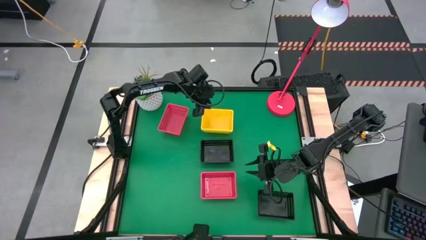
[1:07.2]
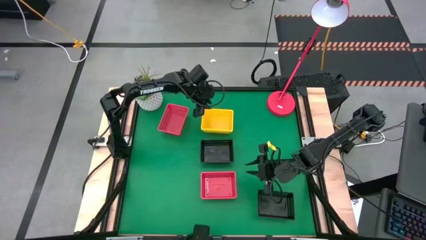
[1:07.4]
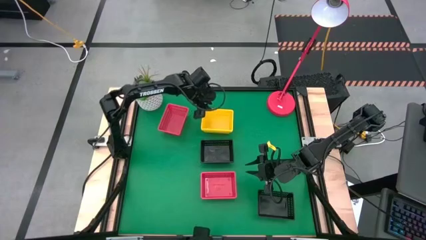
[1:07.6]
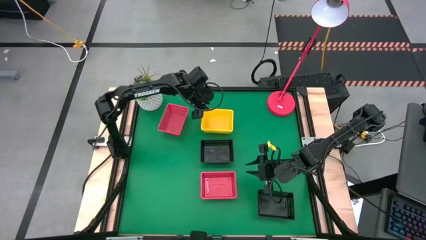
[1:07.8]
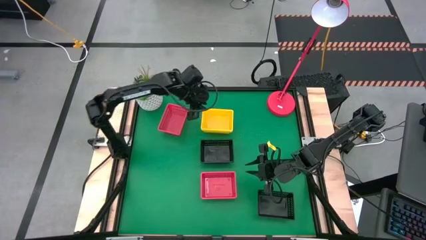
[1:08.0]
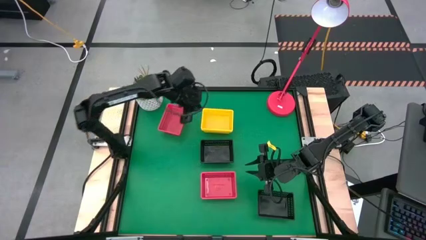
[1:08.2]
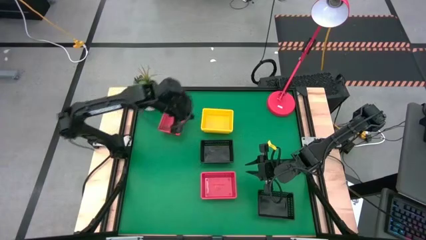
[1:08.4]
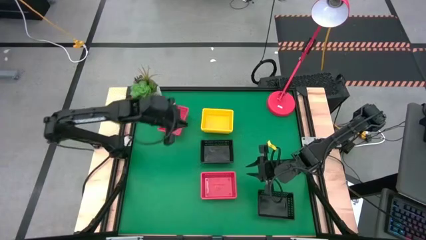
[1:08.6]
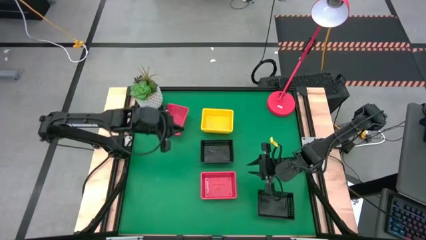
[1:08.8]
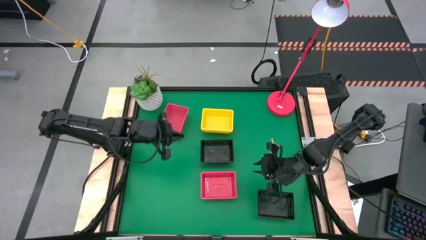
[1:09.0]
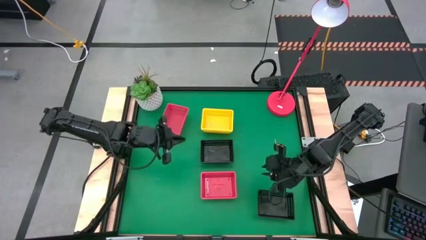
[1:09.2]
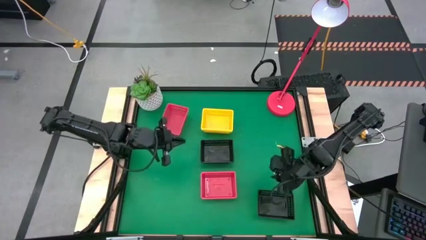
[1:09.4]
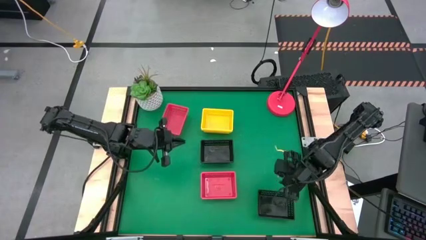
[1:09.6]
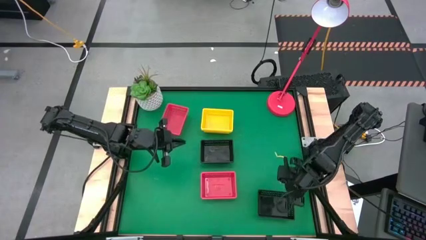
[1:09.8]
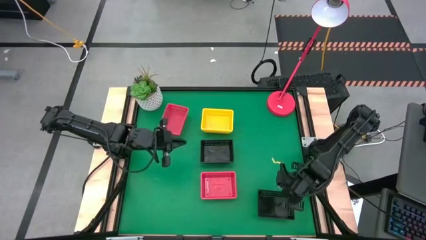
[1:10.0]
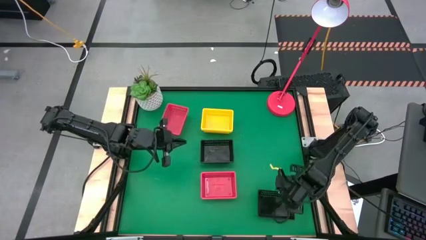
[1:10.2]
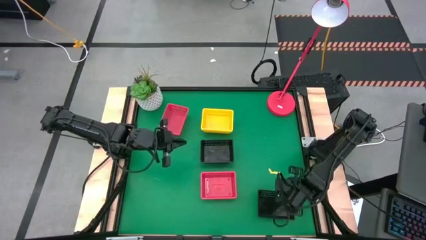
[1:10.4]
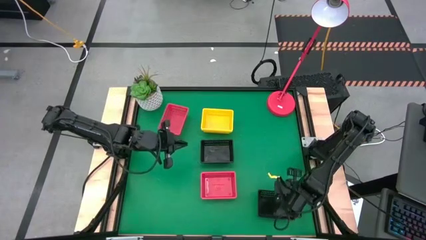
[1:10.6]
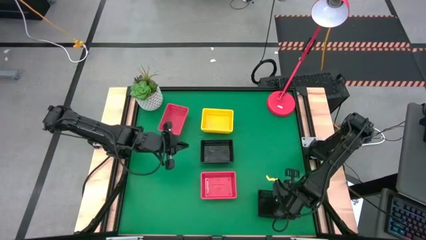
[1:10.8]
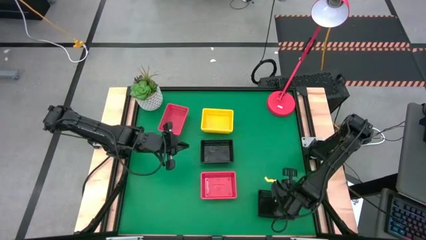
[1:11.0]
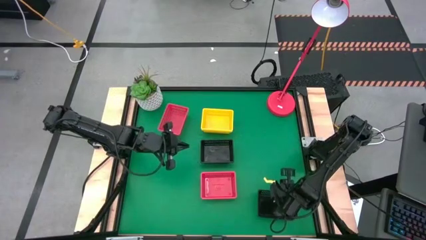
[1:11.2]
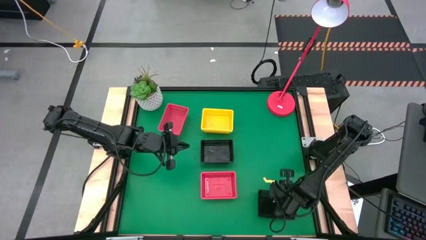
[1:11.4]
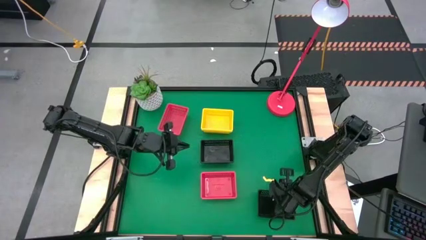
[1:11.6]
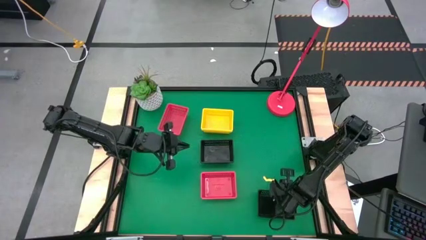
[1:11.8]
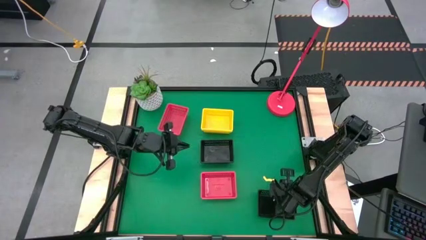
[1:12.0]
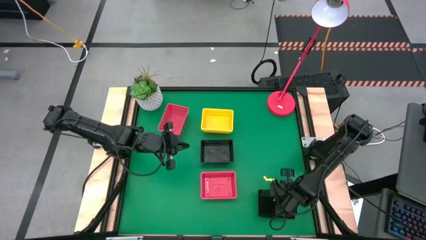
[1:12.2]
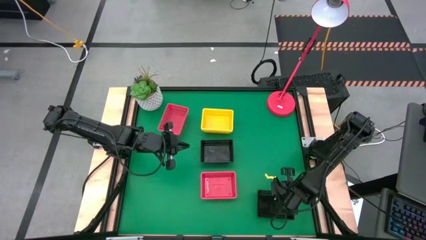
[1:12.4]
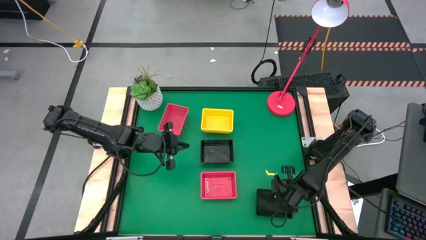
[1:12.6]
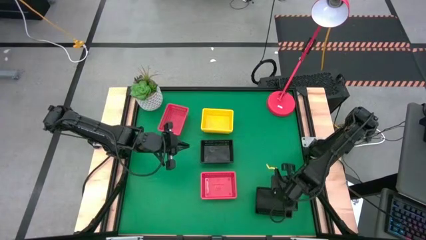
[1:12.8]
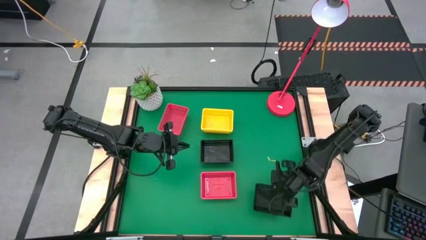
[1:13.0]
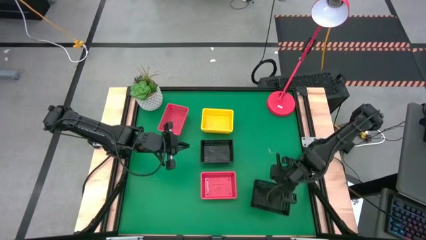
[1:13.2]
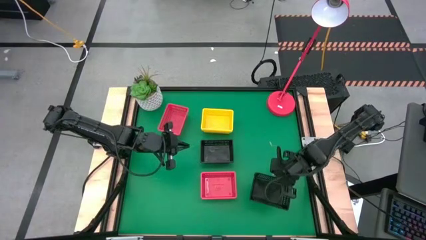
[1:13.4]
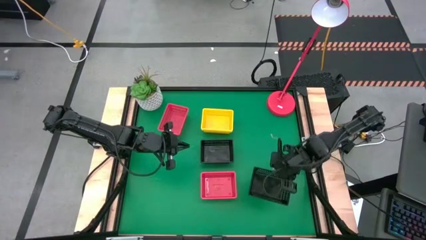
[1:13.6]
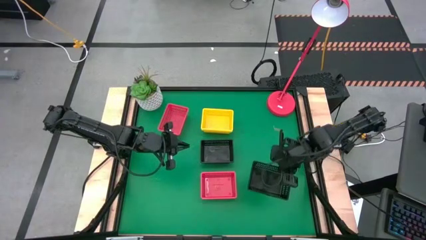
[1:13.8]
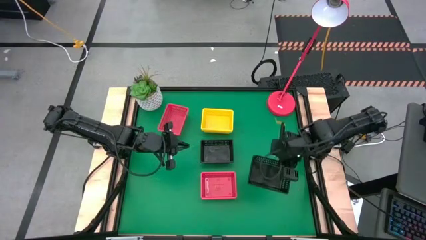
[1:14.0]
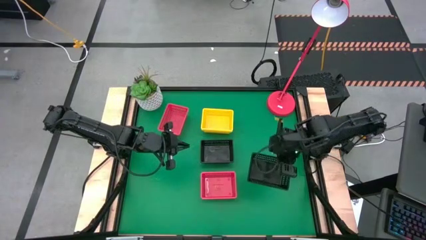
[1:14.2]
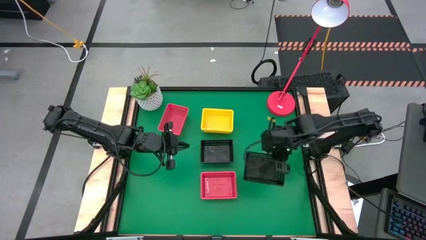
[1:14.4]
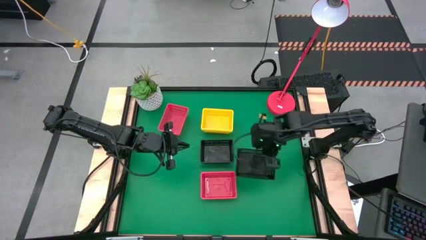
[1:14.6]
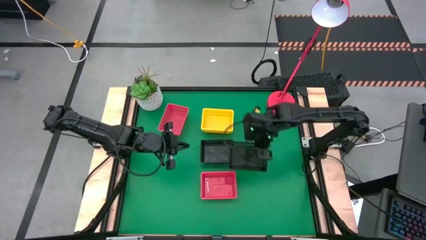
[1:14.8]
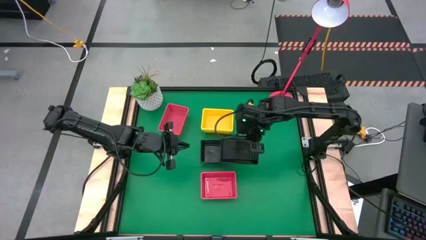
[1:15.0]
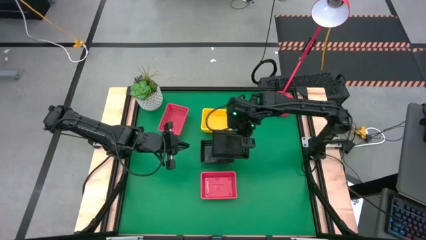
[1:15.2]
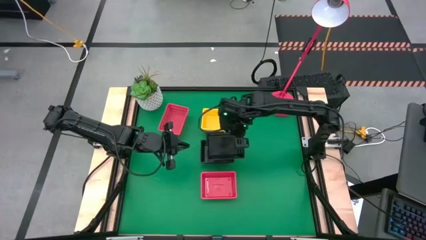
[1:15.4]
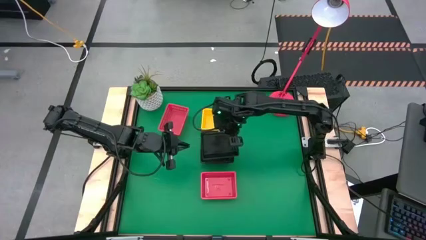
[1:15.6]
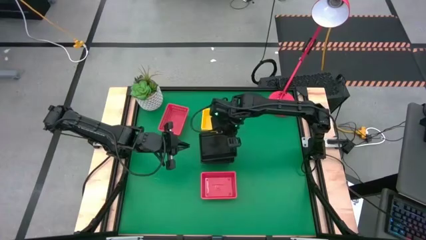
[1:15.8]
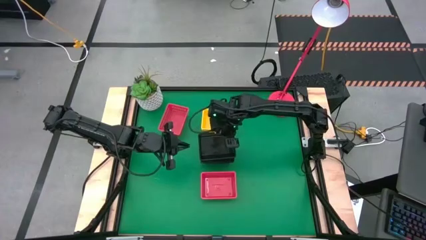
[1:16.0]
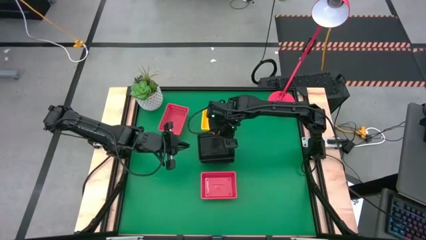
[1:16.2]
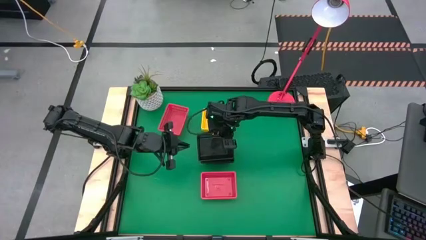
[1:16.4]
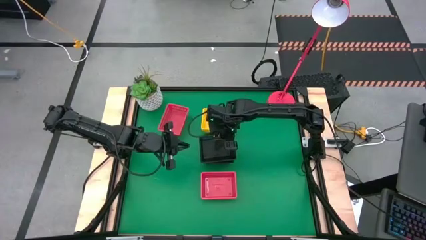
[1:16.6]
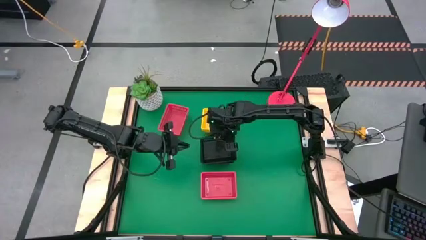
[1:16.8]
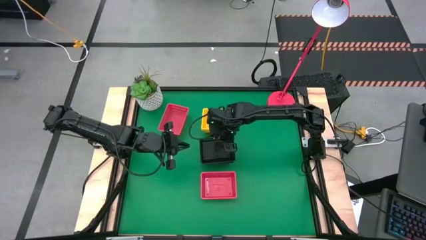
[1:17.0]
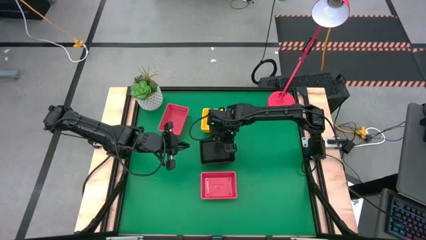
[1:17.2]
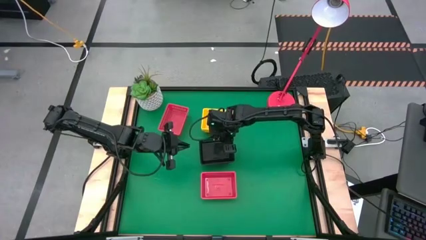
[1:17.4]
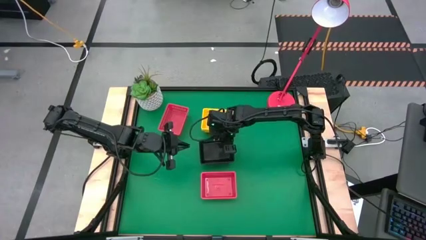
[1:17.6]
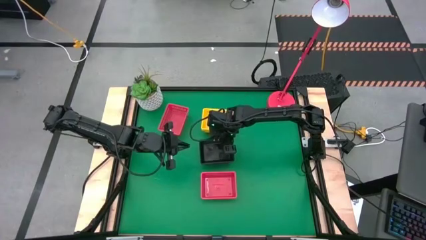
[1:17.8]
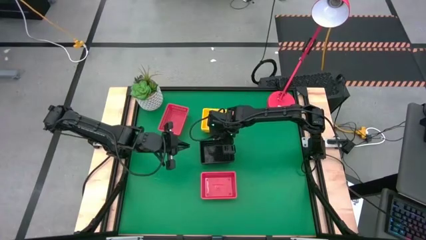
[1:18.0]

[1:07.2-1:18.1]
Stack the bottom black basket on the top black baskets

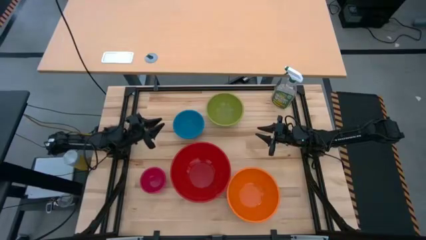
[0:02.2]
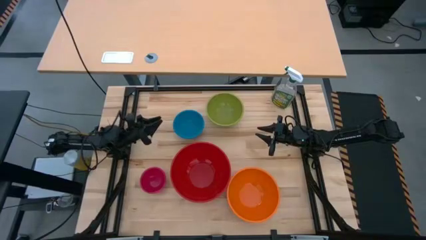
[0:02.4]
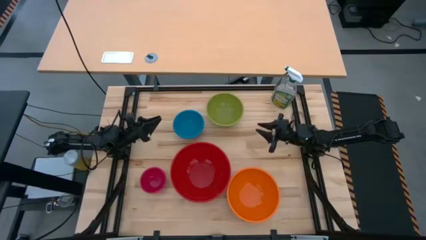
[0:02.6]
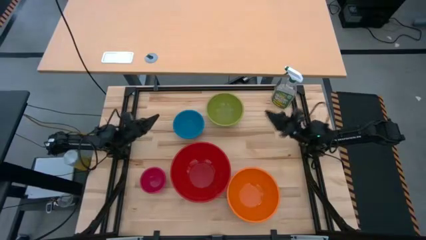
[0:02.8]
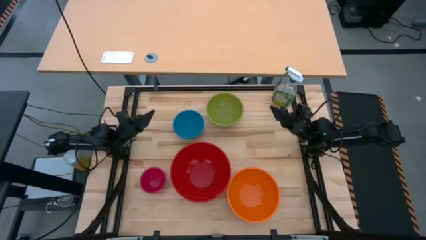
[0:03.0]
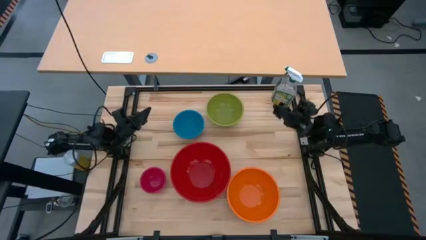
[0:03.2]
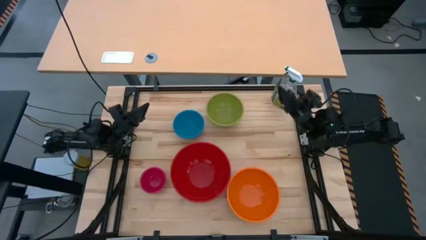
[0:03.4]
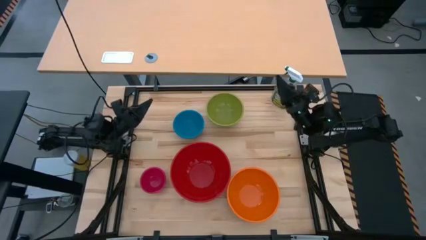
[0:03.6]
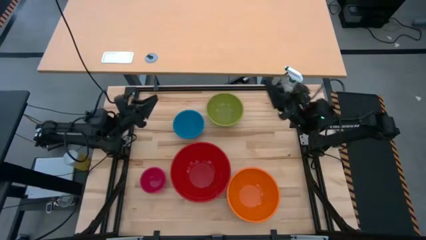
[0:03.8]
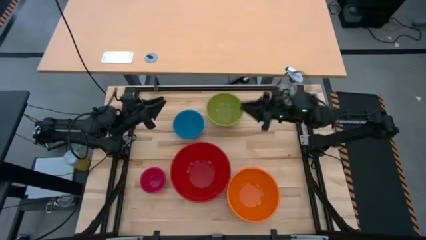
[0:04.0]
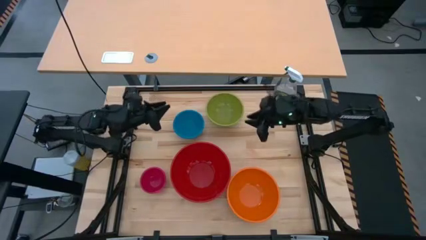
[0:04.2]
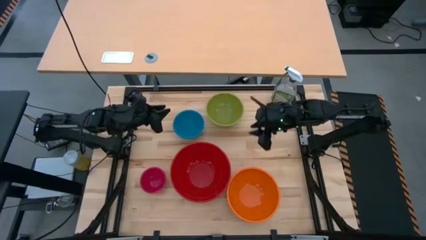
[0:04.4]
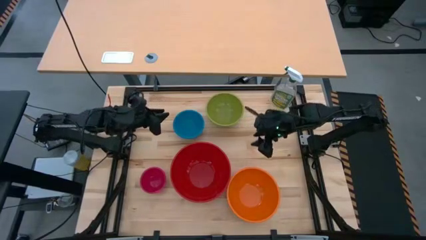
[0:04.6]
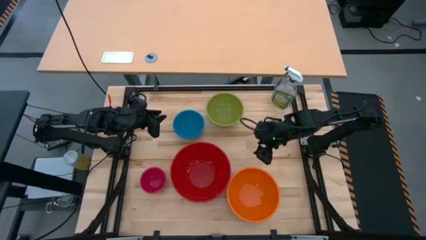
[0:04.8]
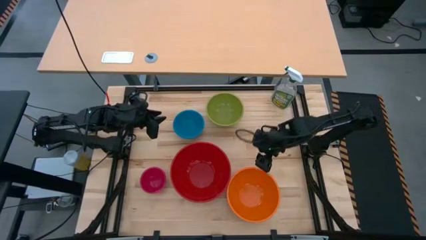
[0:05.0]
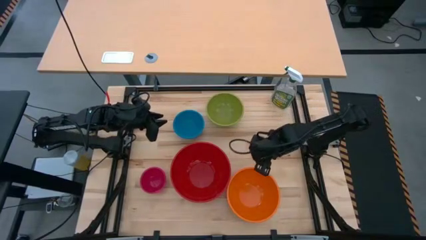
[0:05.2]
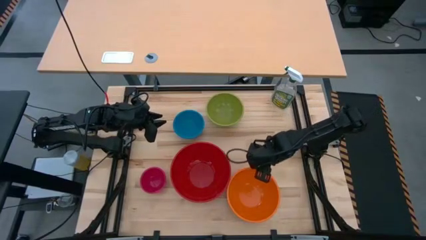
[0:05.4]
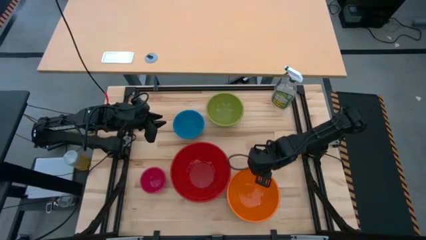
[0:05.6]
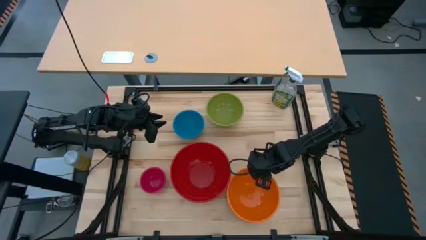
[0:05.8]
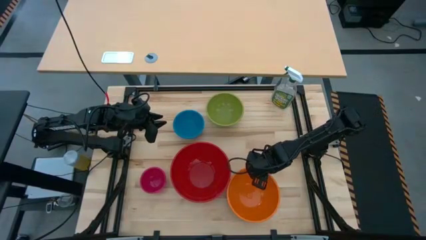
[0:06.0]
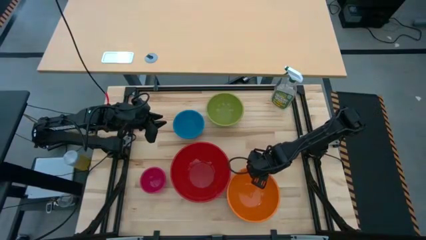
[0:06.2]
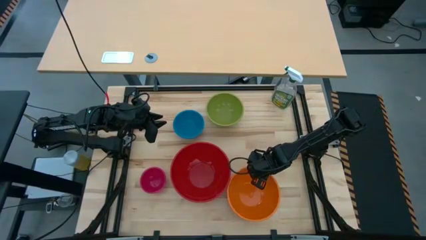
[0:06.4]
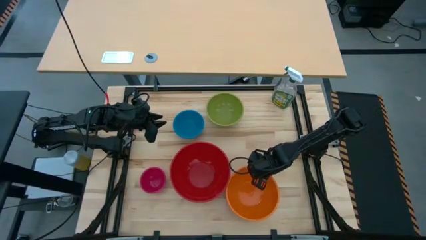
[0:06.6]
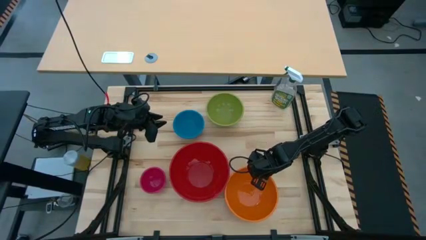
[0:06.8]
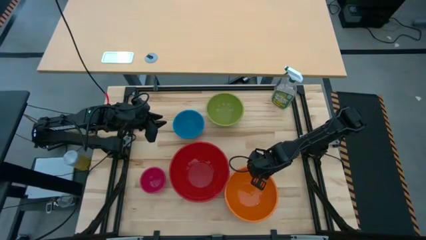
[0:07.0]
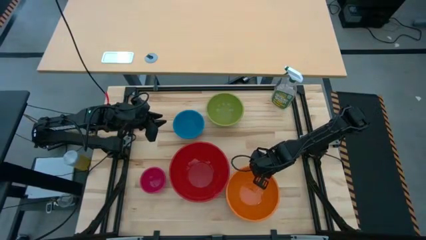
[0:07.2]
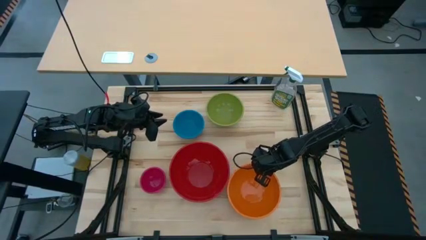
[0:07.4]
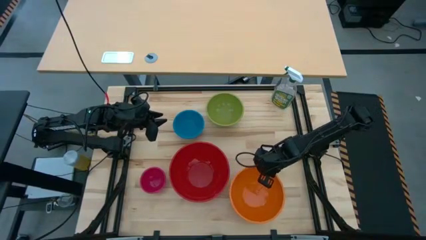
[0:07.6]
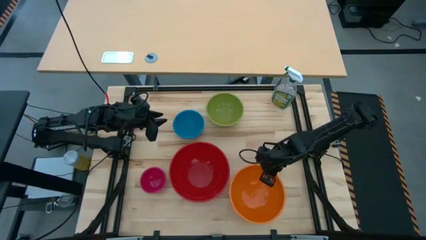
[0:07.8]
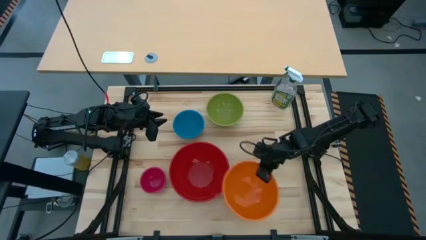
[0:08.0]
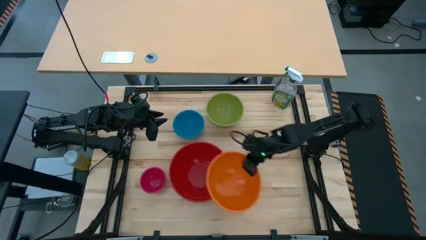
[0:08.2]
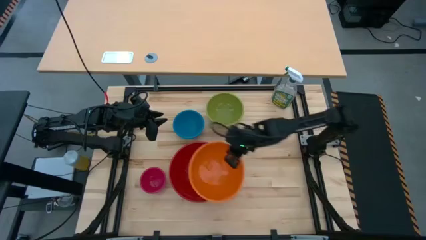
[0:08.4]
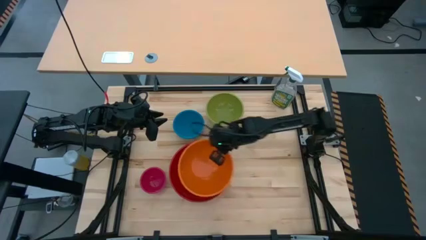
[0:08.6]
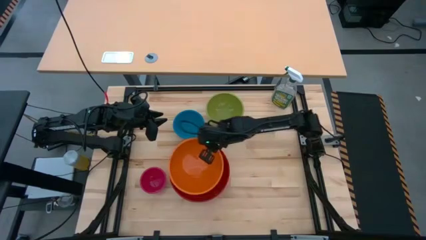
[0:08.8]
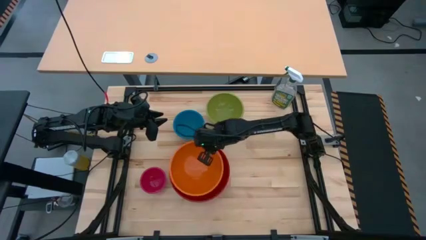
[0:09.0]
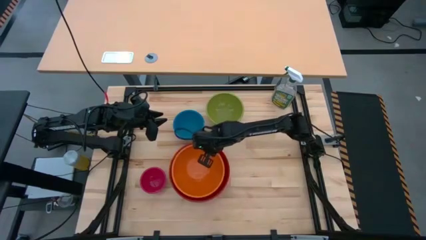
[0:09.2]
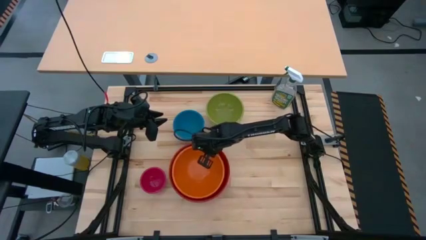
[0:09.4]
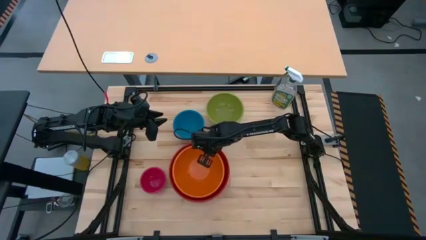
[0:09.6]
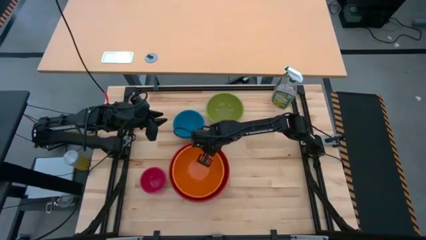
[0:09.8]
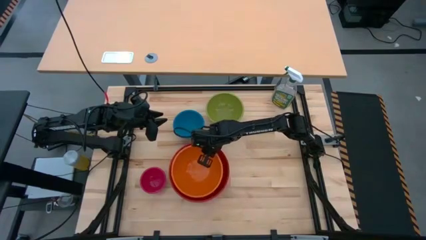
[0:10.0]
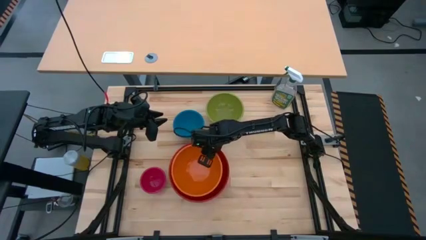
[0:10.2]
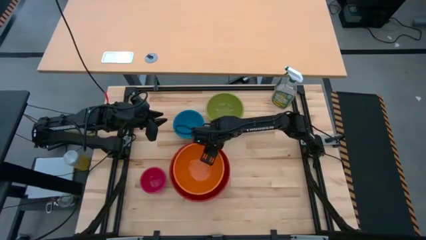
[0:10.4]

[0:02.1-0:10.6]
Stack the orange bowl on top of the red bowl
